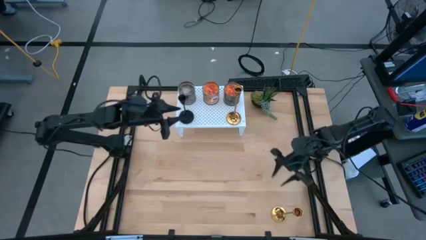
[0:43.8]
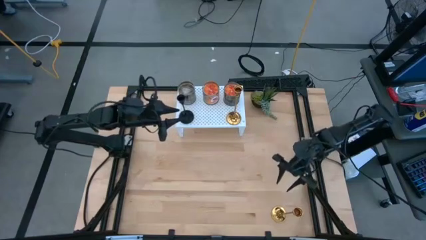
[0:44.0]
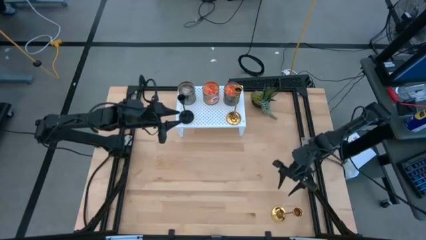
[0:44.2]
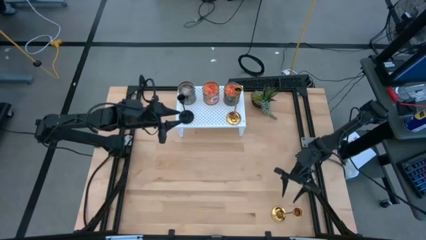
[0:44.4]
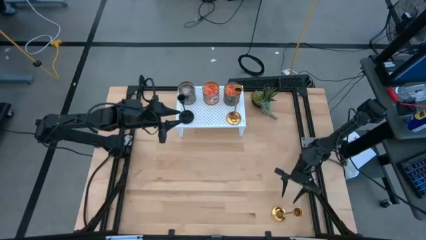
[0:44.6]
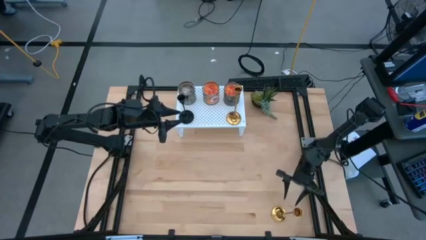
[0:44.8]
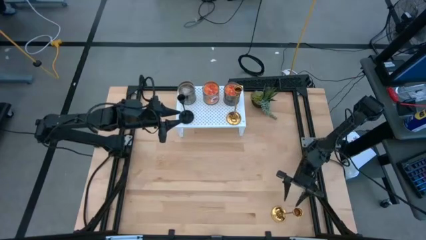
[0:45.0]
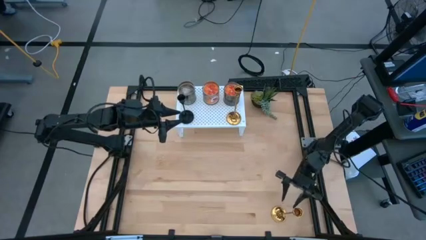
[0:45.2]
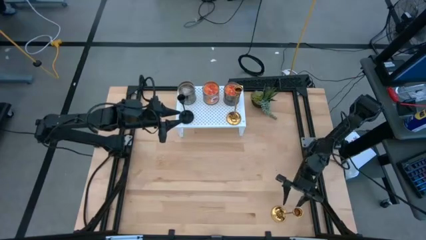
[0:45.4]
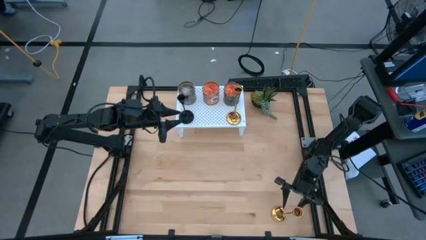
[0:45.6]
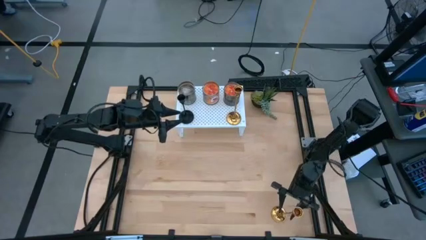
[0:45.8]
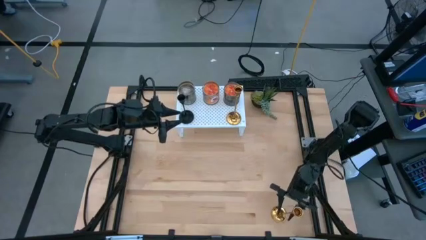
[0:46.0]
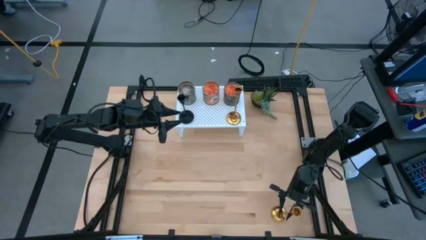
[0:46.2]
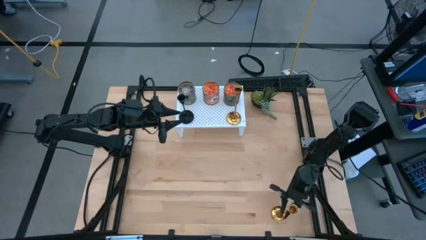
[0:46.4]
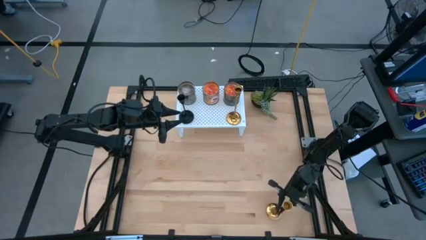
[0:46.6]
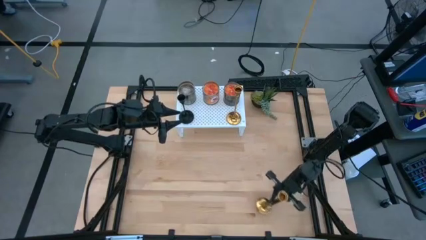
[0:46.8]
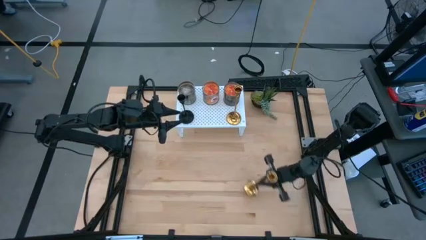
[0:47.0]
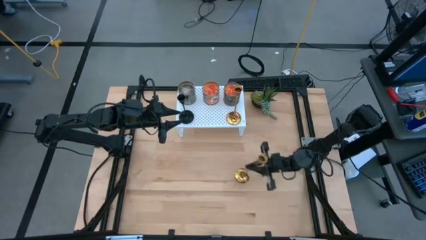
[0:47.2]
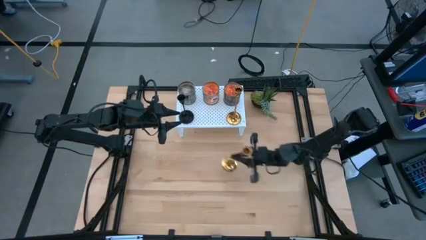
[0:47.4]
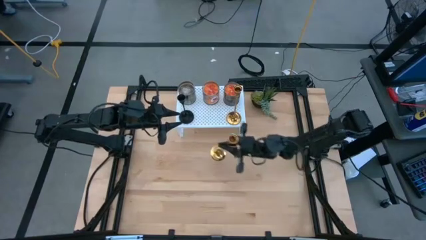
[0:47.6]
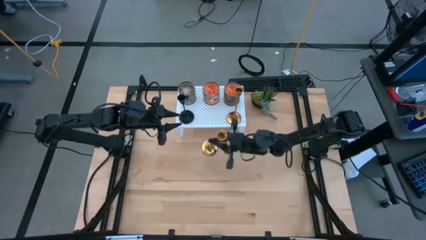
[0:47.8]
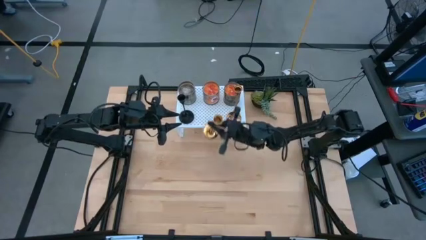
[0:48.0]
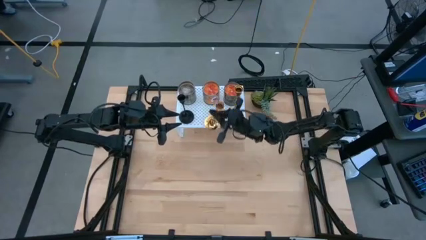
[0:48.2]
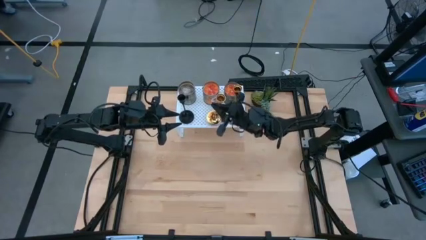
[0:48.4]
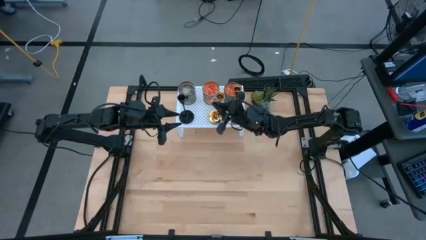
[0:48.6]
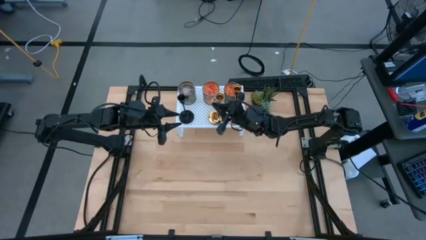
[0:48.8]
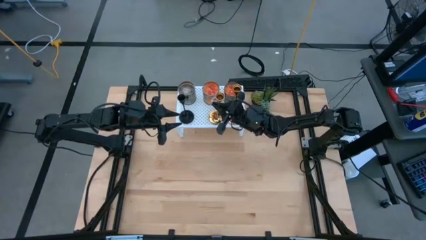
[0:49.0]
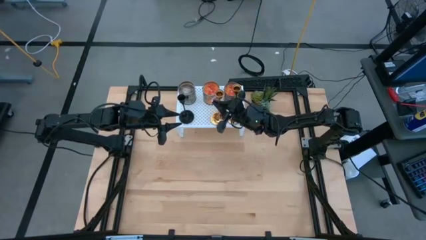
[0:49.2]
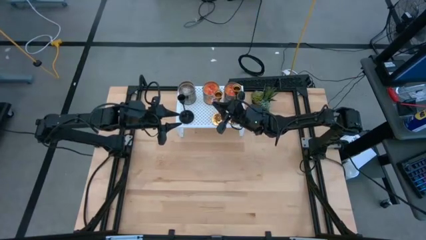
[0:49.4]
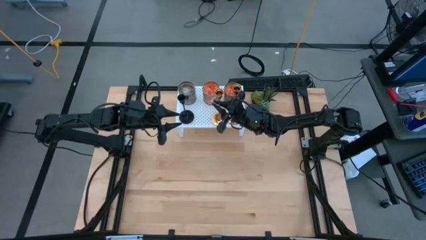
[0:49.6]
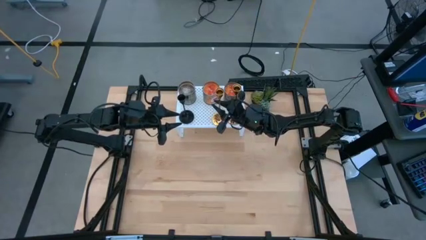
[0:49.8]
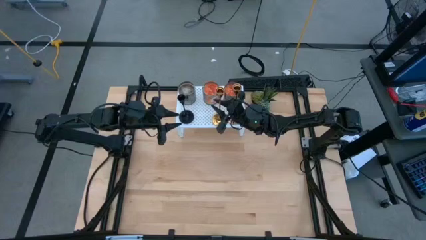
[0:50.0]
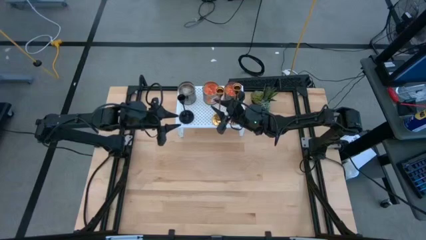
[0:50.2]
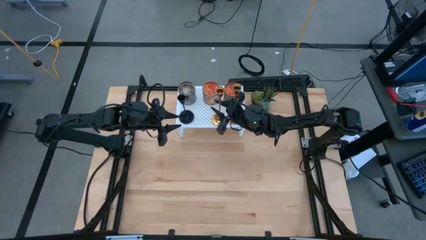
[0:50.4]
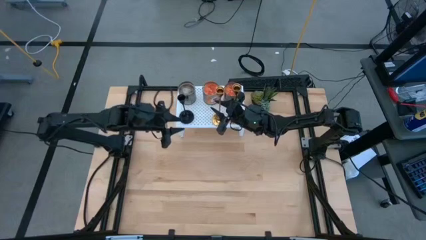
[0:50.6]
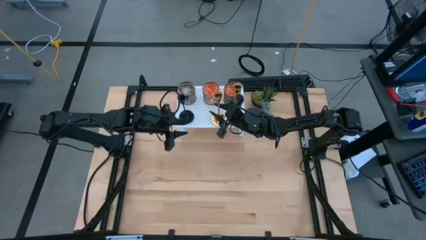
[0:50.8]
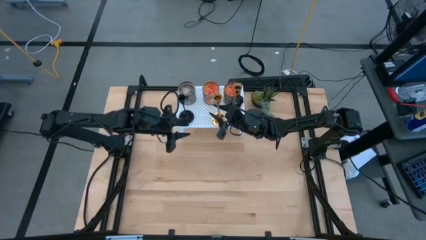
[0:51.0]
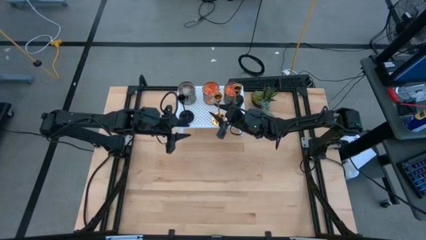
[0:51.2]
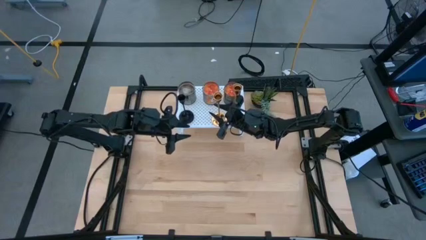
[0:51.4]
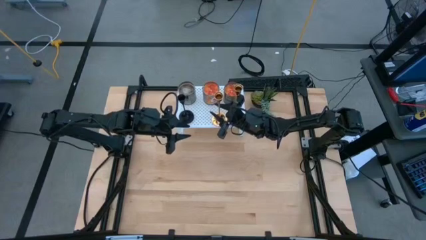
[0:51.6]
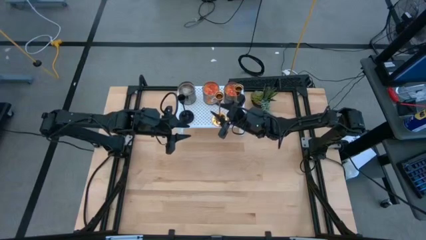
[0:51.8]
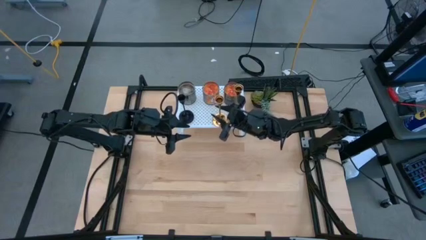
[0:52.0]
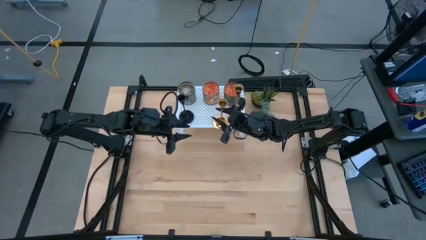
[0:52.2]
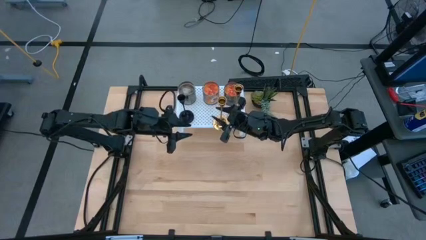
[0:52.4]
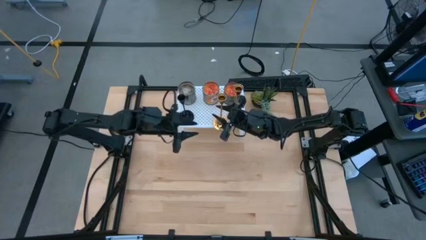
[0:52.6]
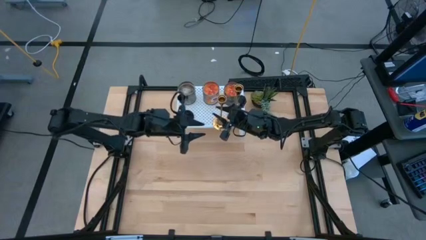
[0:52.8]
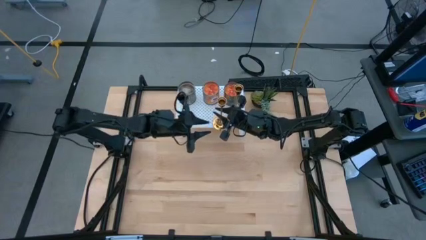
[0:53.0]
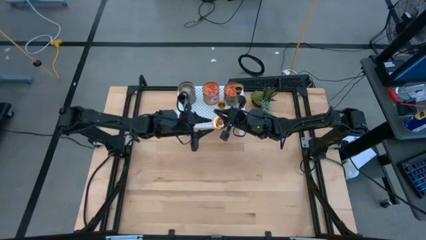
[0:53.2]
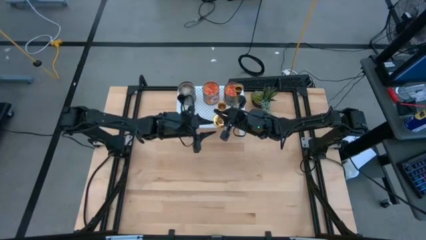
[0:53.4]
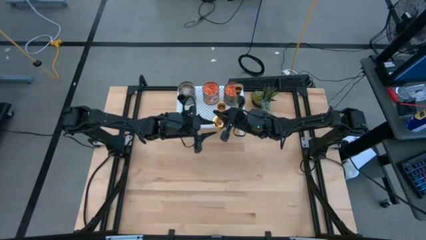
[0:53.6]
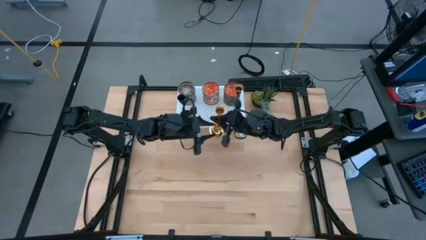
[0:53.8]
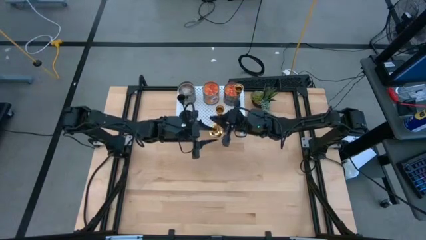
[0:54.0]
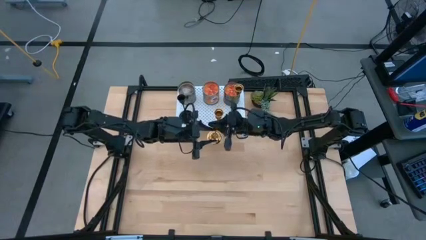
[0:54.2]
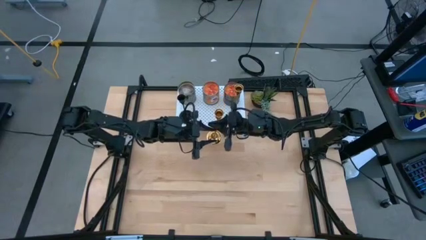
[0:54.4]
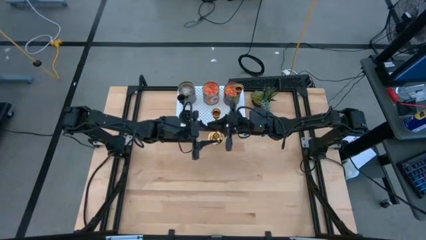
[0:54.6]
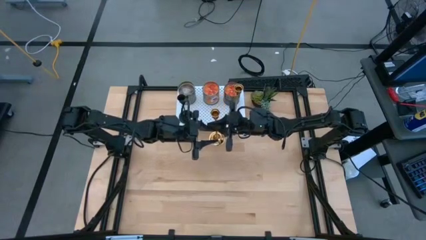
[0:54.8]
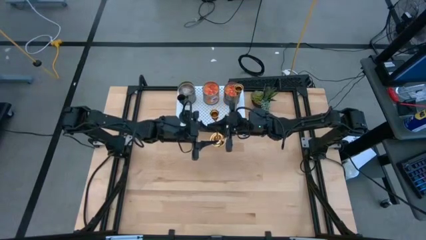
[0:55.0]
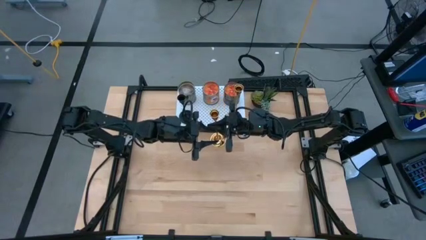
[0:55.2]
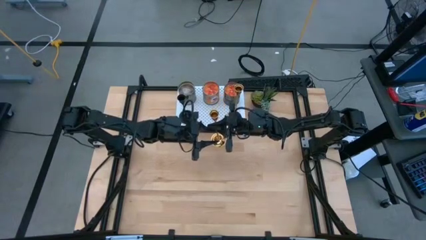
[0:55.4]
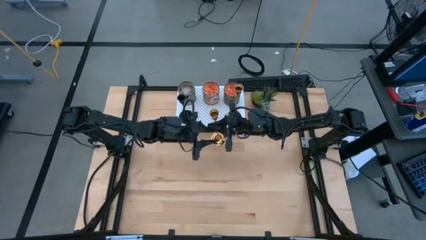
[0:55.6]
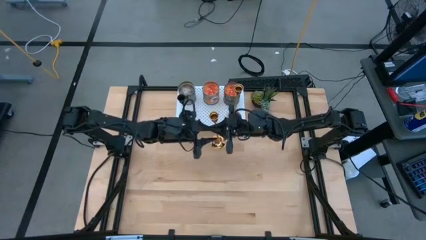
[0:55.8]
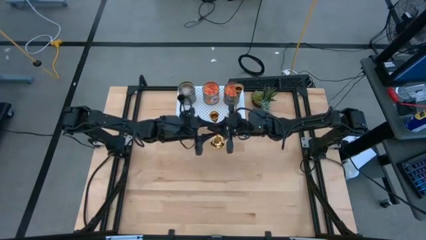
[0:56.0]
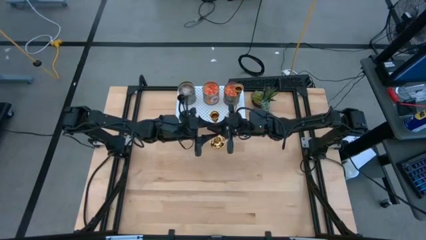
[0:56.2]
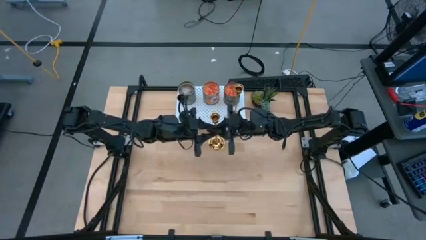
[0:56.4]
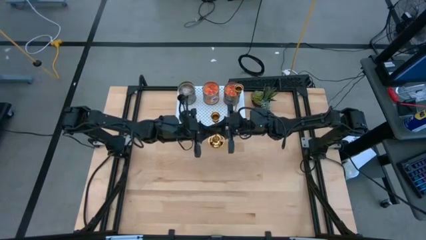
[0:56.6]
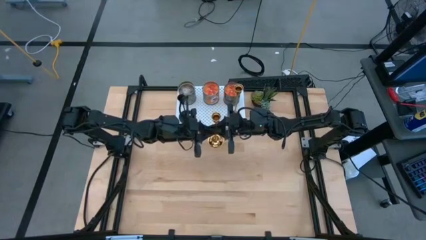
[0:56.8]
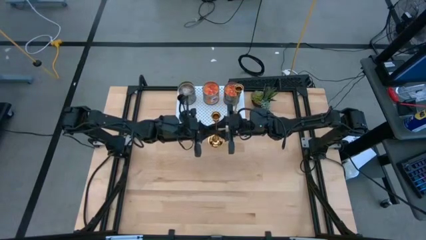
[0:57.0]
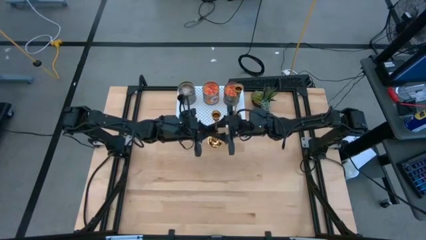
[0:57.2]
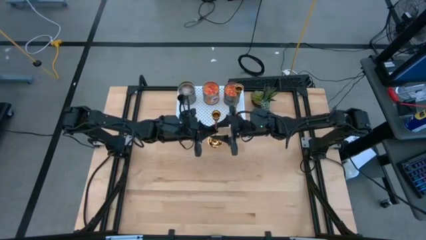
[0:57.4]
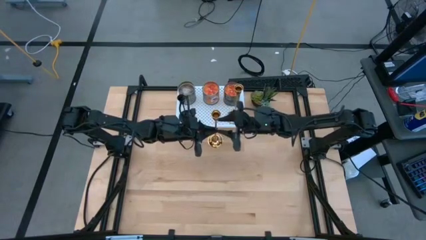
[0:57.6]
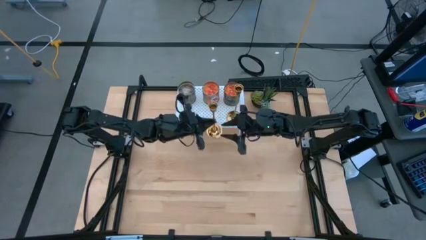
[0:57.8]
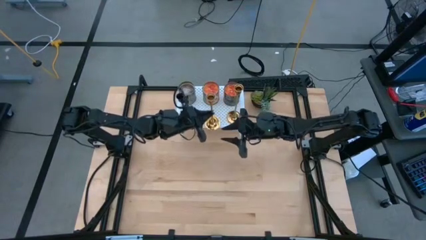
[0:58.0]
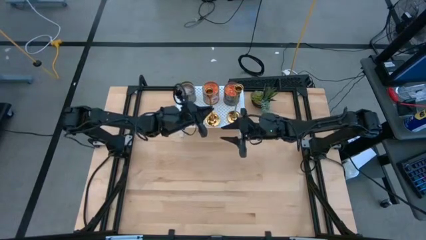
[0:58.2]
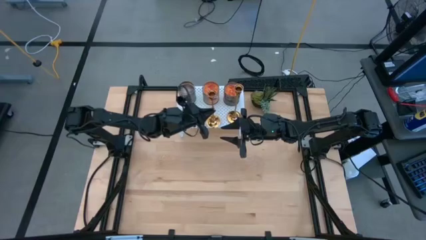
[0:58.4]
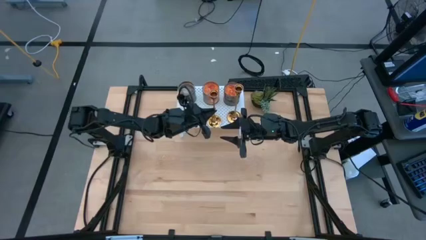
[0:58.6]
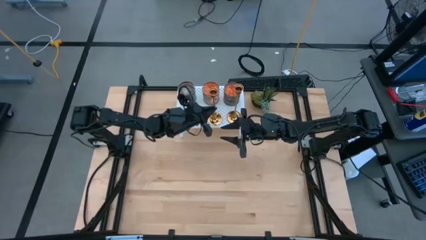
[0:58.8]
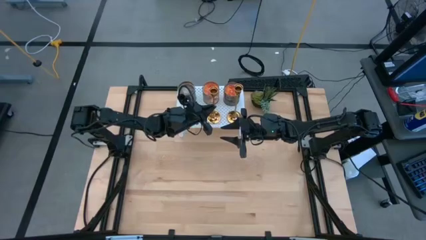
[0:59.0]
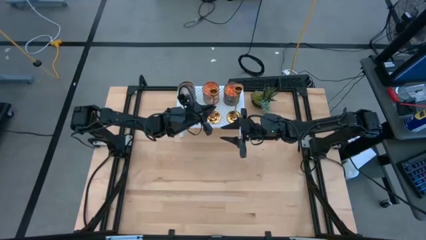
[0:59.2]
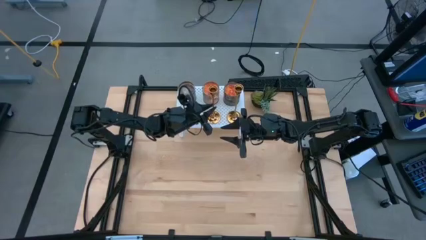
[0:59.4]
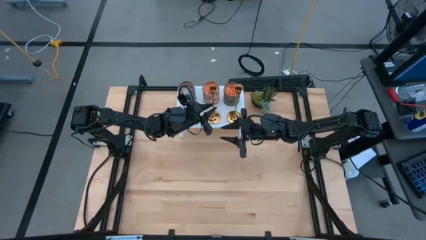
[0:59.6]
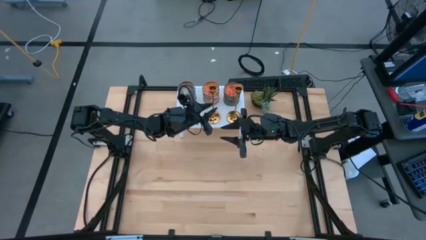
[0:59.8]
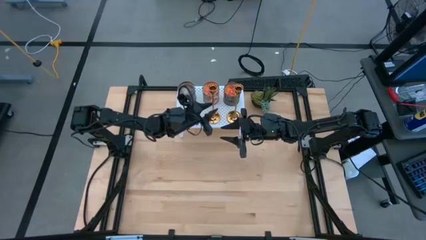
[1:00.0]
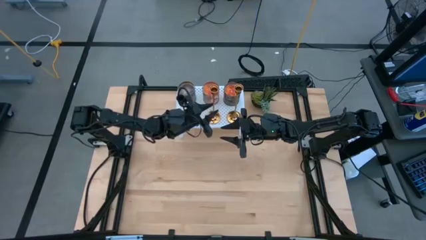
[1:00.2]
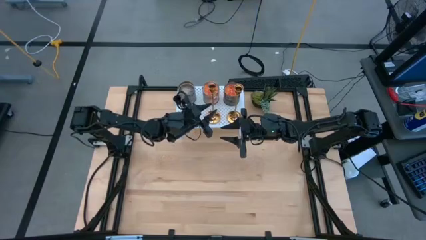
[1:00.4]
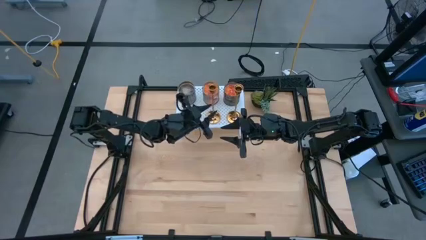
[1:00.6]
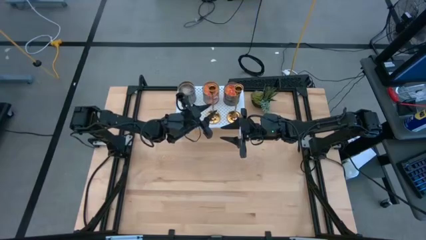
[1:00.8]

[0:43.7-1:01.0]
Task: Pick & Place candle stick holders
Put the gold candle holder on the shelf aligned with the other candle holders

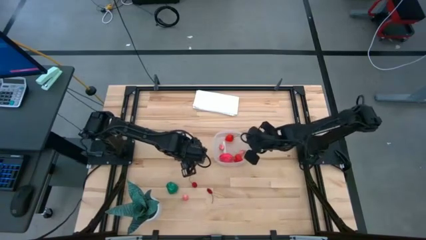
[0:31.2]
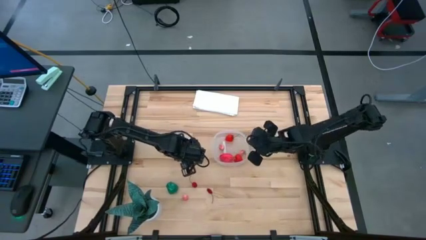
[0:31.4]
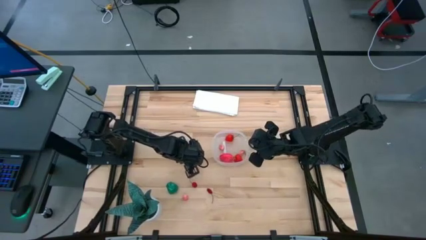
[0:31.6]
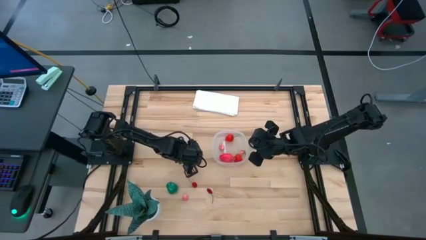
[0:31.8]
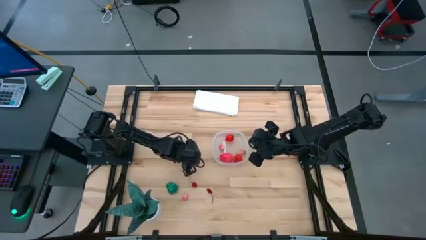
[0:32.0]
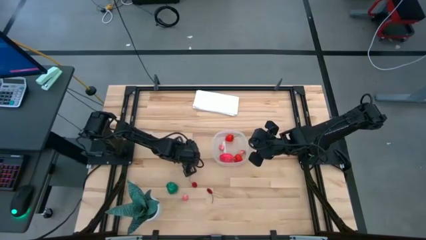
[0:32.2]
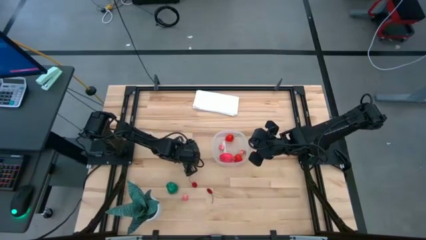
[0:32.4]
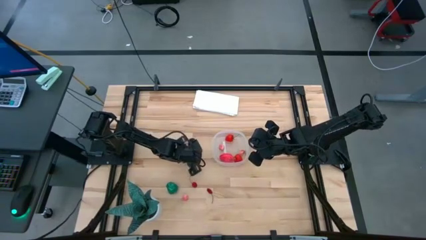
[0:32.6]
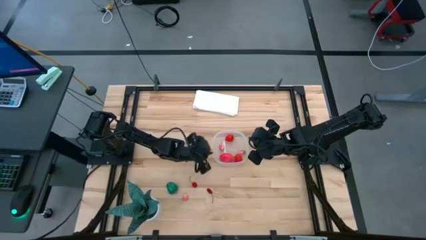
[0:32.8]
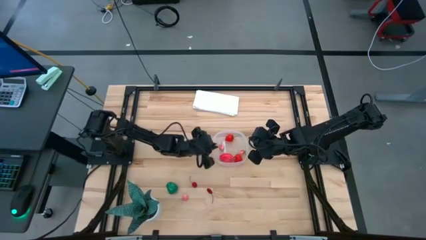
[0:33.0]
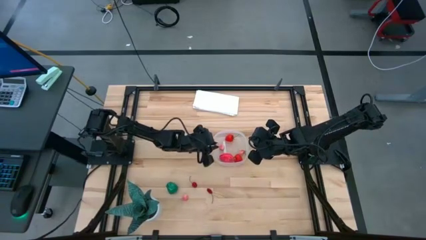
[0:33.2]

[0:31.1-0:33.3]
Task: Pick and placing Produce into tupperware
Put the pink peach into the transparent bin
